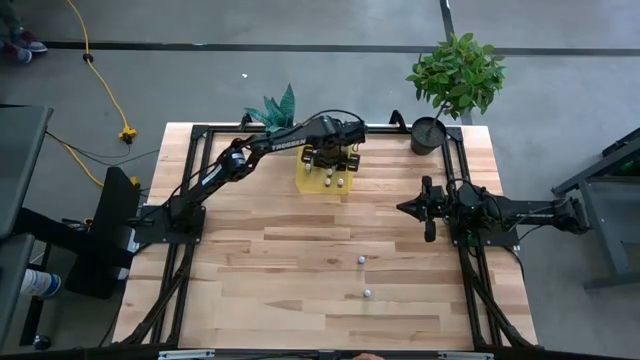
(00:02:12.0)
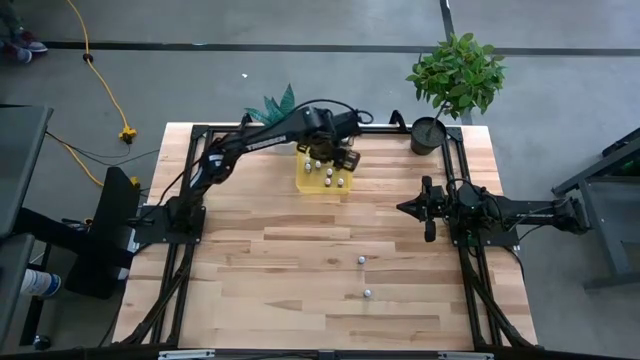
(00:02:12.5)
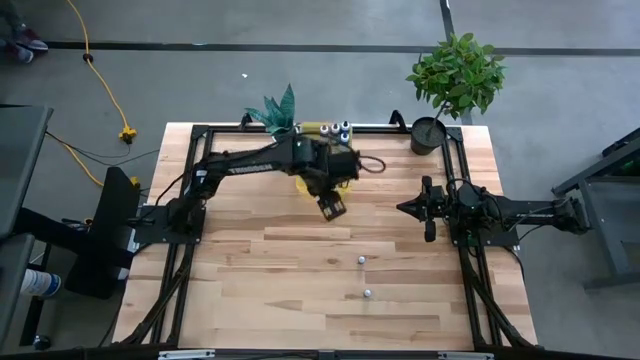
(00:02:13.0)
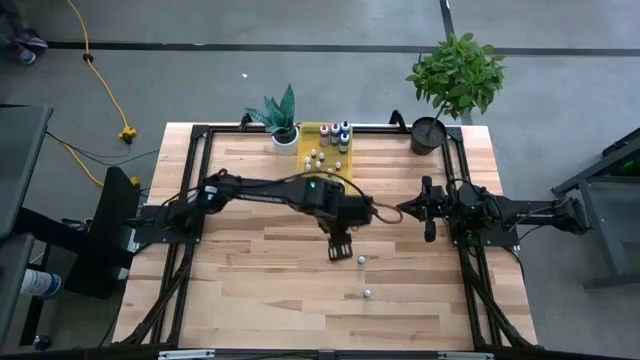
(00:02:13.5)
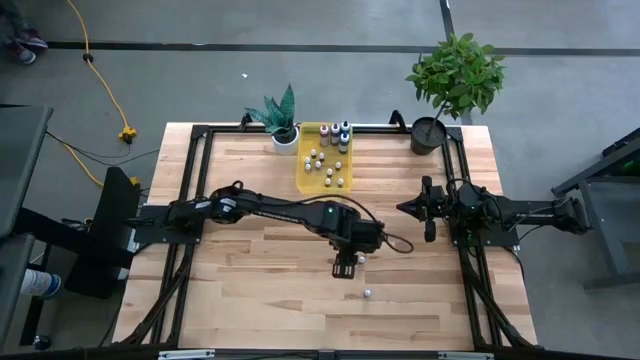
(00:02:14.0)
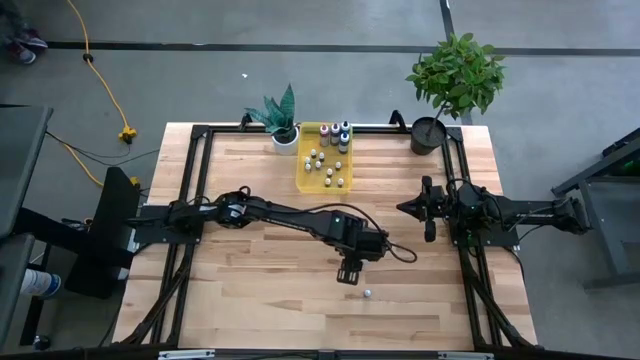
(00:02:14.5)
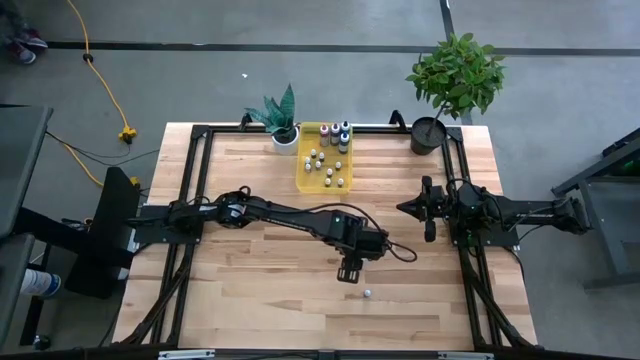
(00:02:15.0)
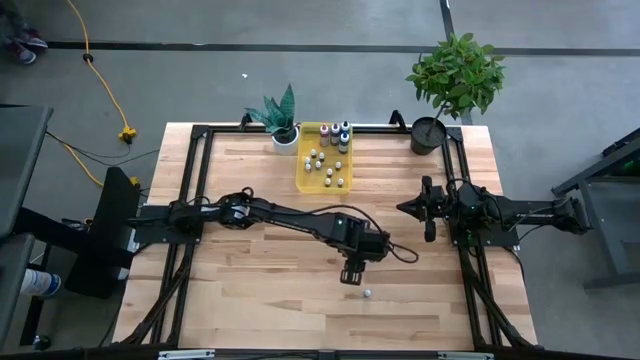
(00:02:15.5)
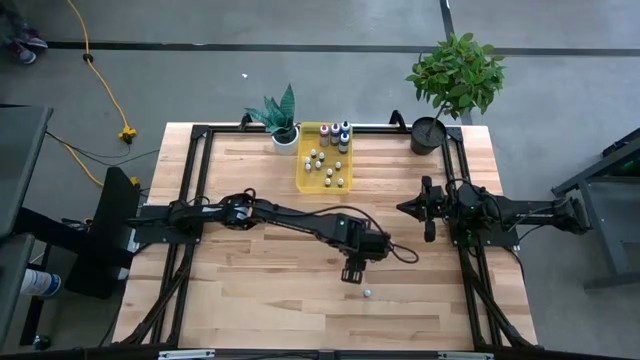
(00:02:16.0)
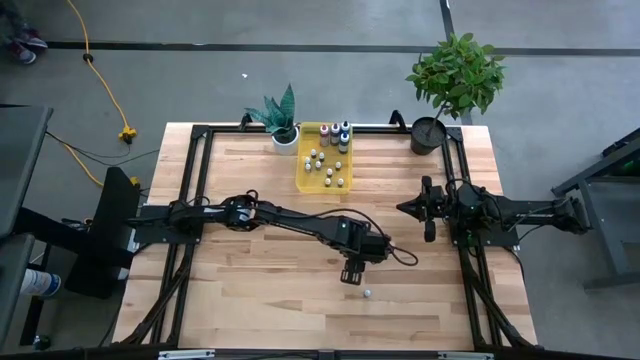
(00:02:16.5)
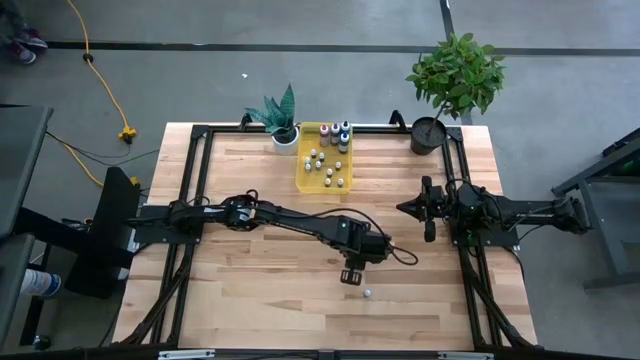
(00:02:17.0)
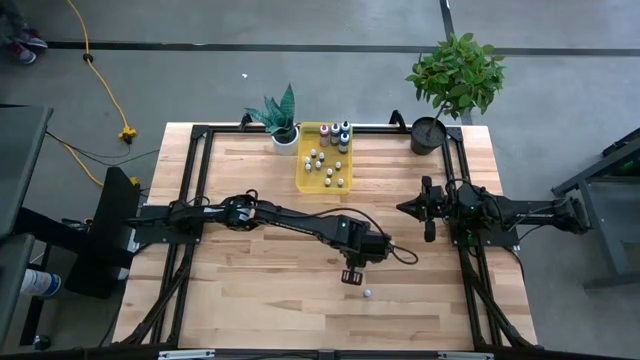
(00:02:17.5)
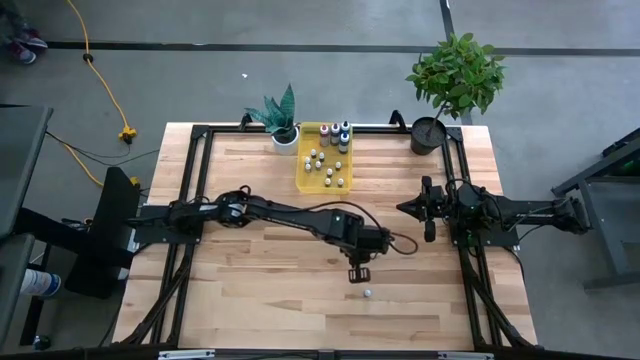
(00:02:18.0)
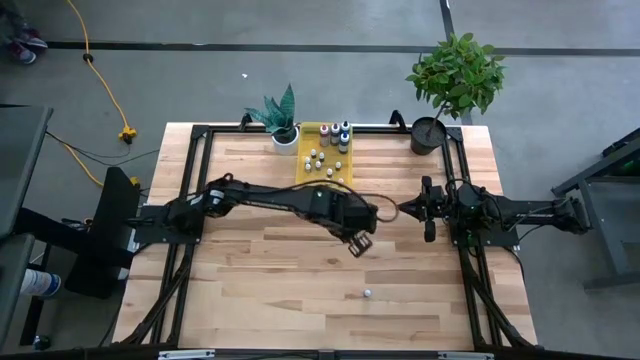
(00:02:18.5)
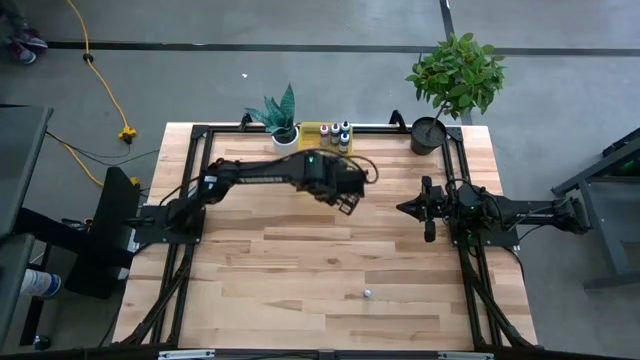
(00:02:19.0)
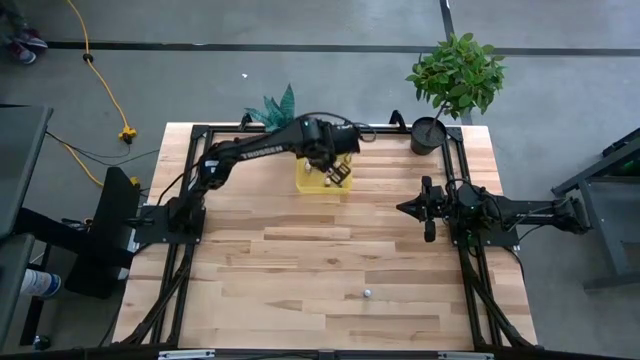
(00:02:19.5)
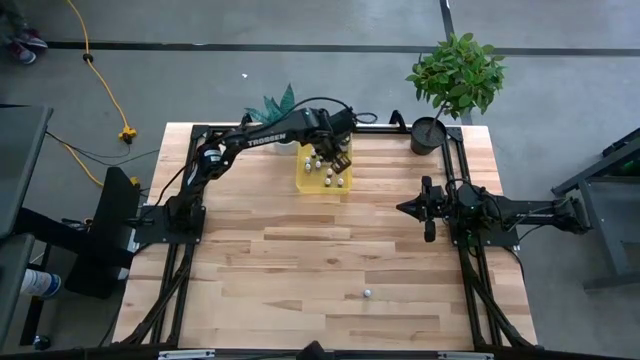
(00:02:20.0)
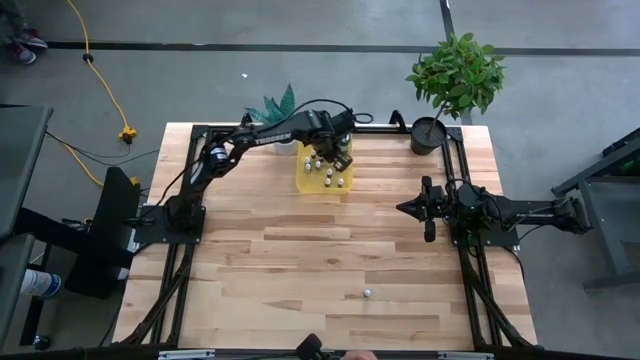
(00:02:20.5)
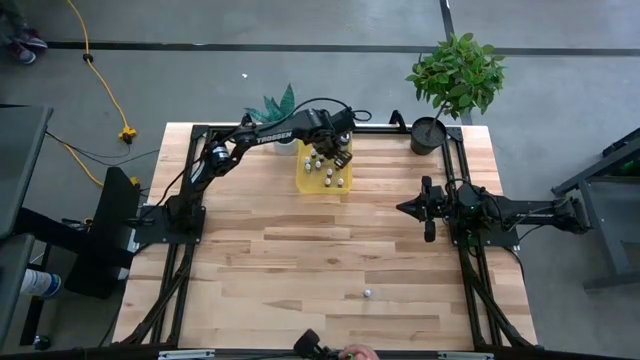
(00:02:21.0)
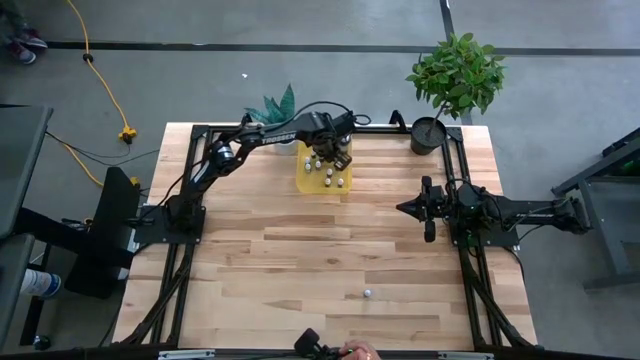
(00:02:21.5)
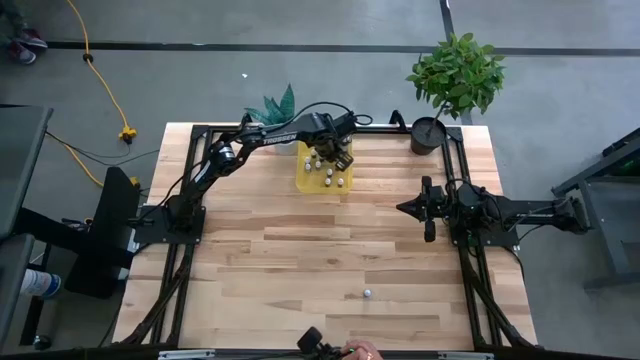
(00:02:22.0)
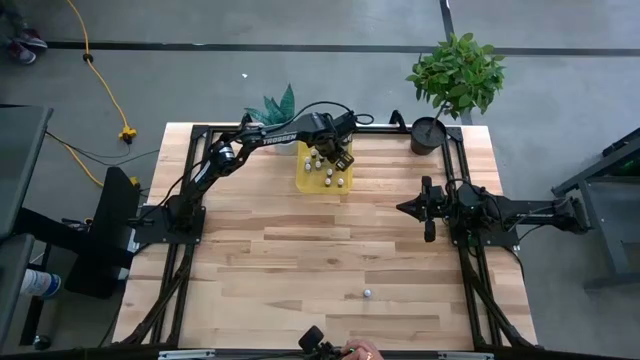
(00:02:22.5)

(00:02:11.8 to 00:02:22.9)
Task: Pick & Place food coloring
Put the small brown food coloring bottle into the yellow bin

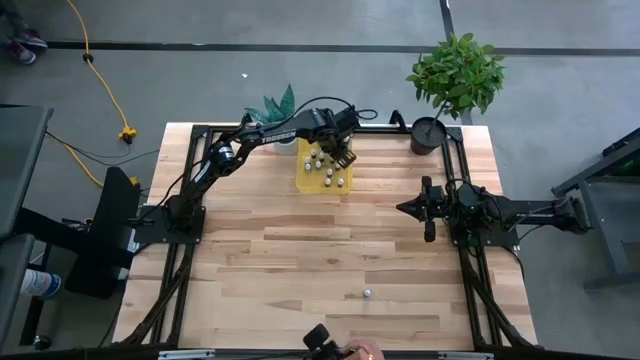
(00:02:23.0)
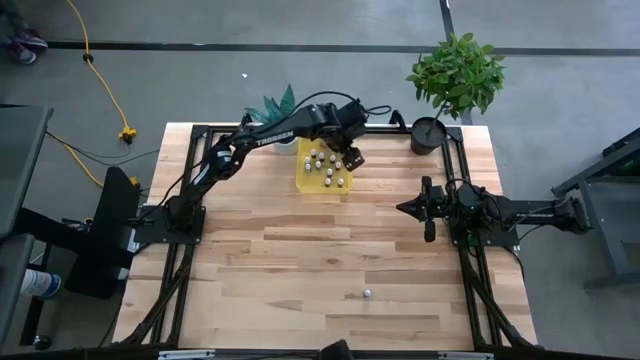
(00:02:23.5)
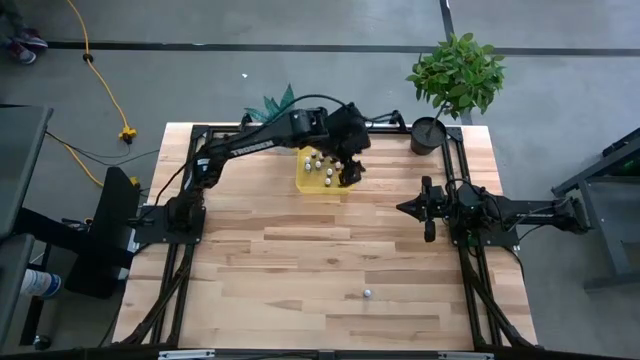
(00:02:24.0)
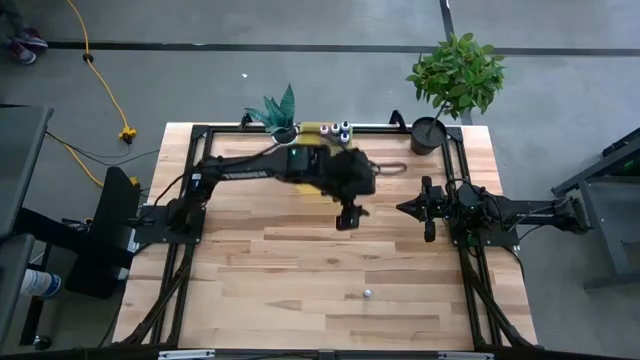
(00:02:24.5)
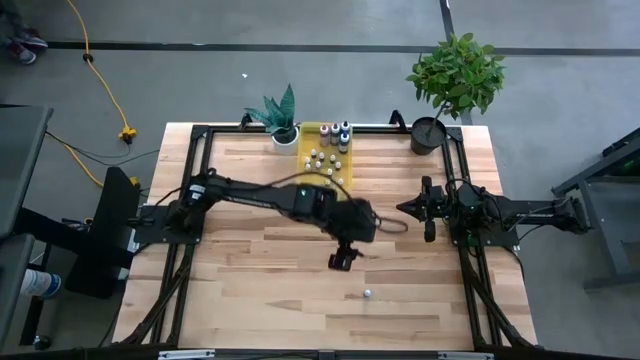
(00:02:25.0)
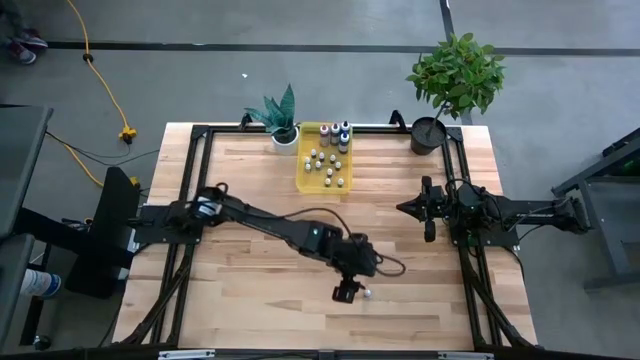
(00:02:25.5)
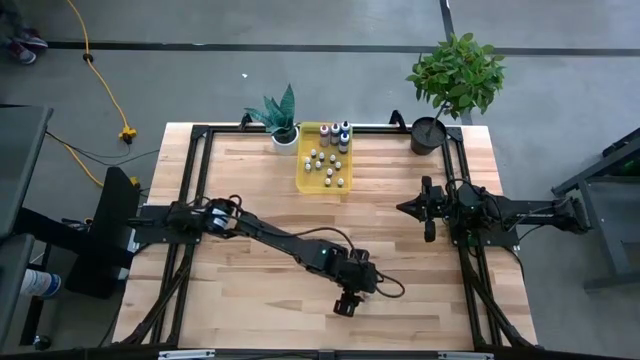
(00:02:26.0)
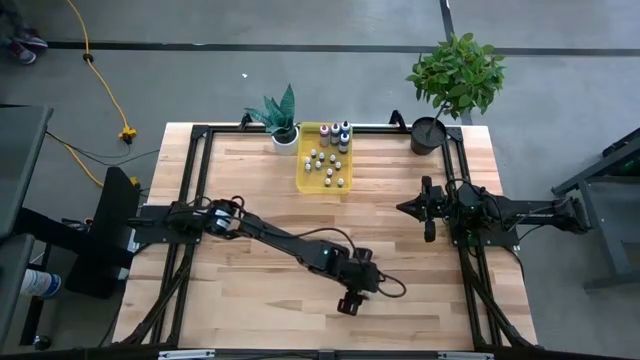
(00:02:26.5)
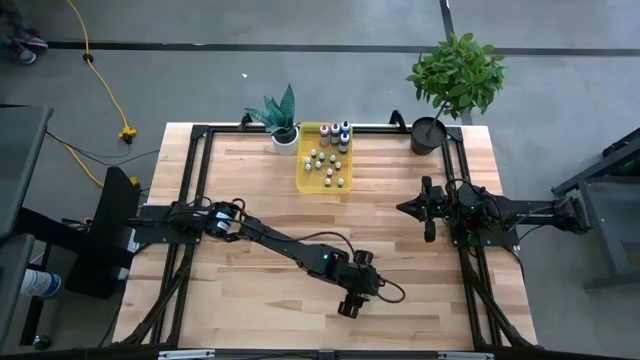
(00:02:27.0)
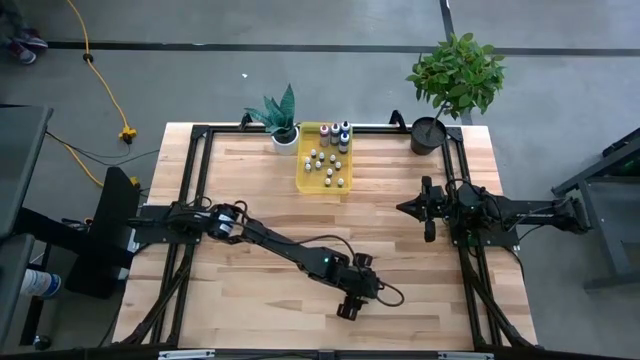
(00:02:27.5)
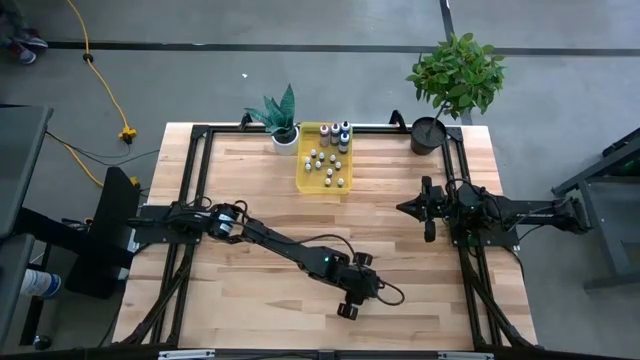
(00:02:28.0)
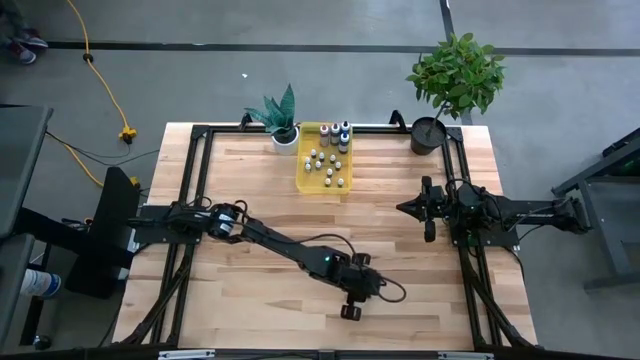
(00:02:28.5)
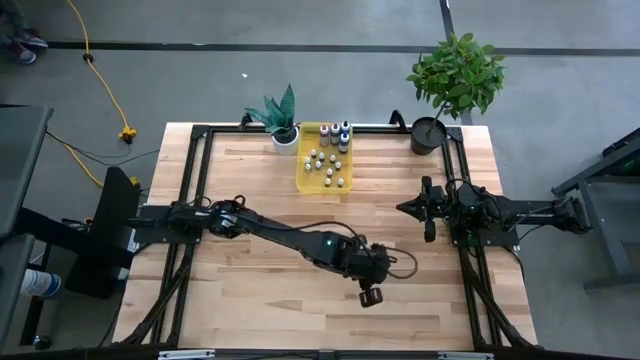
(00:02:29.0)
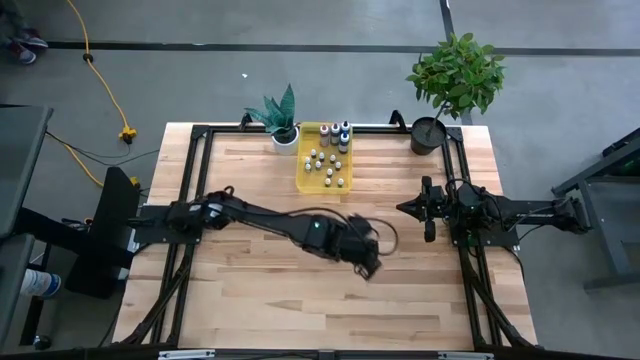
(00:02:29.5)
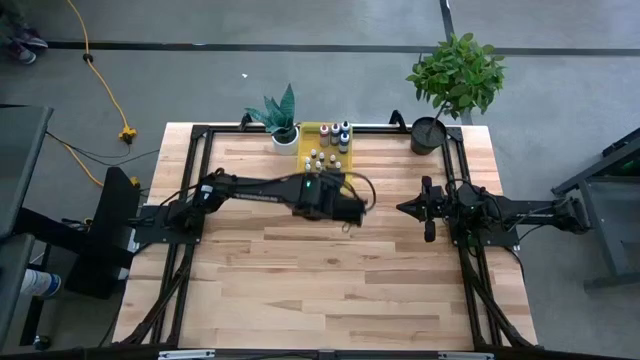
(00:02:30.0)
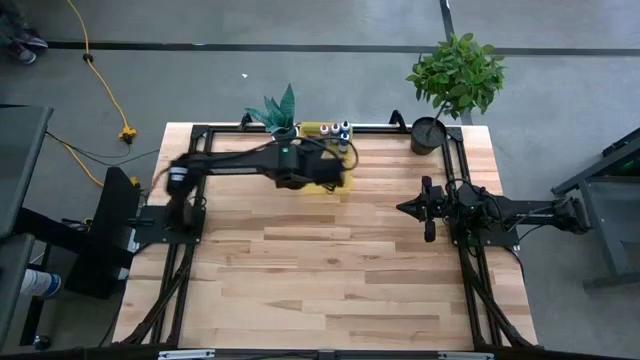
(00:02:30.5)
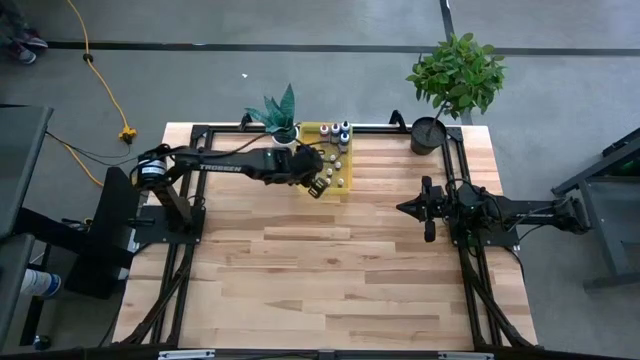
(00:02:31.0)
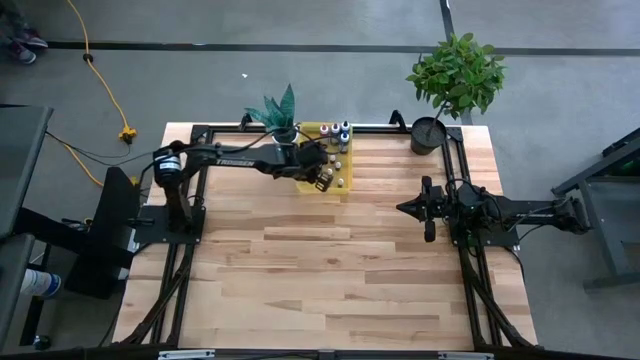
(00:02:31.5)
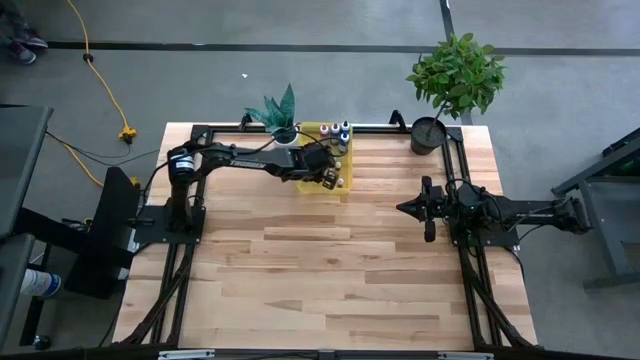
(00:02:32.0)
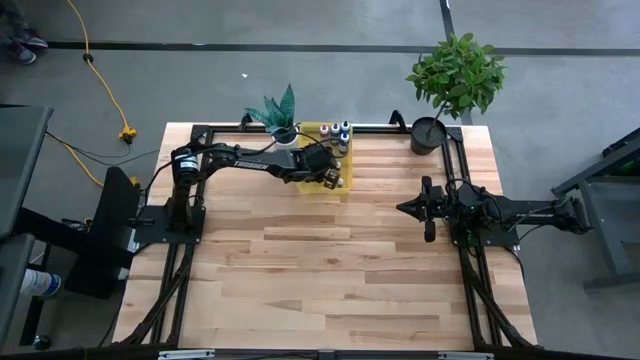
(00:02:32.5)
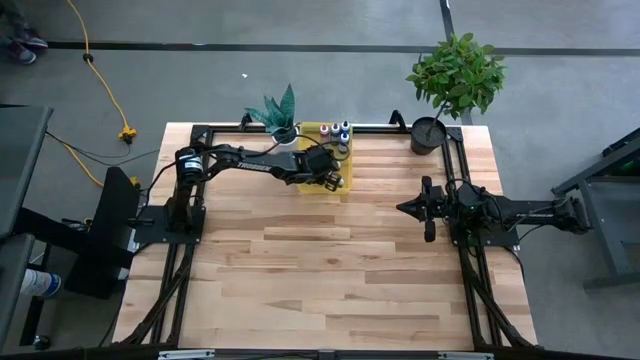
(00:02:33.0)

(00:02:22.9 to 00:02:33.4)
Put the small blue food coloring bottle into the yellow bin
